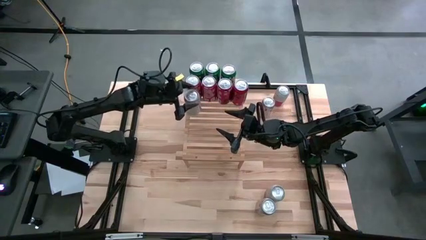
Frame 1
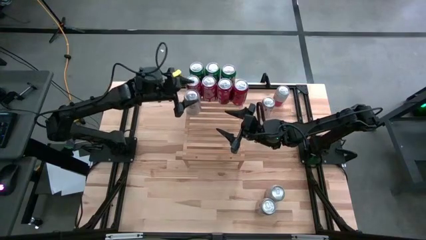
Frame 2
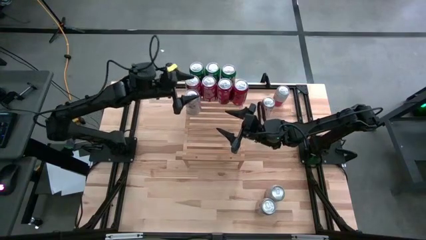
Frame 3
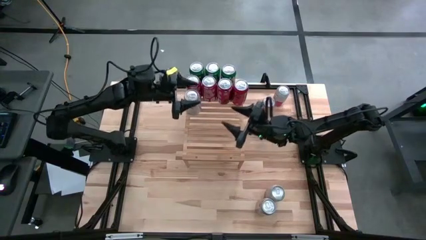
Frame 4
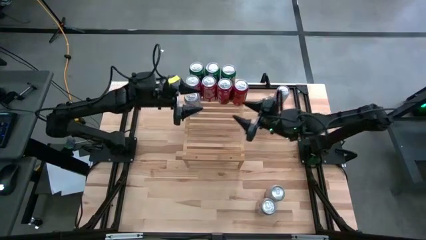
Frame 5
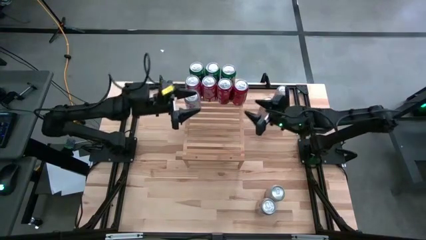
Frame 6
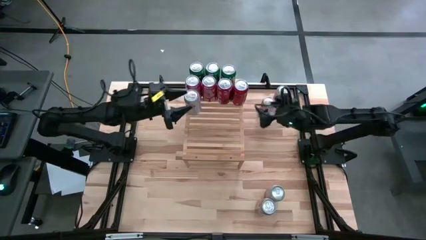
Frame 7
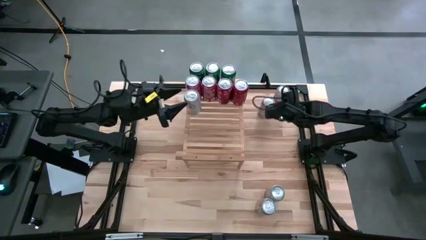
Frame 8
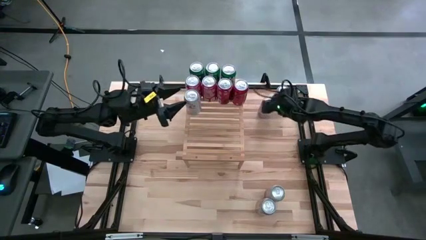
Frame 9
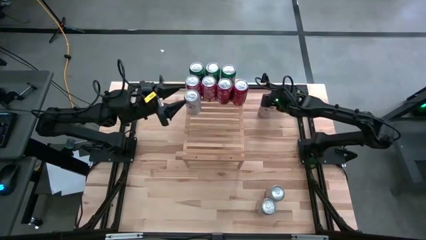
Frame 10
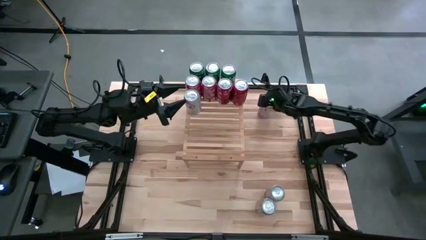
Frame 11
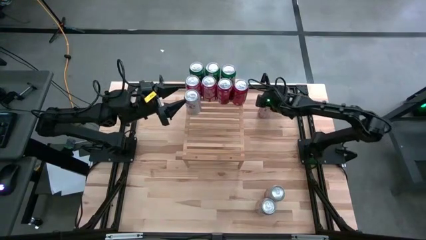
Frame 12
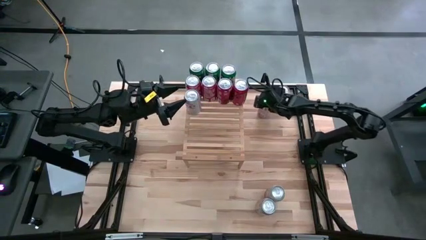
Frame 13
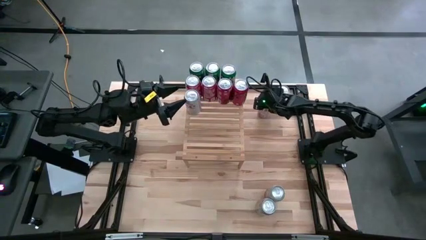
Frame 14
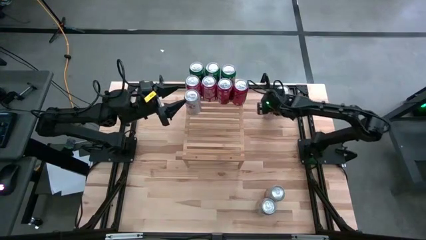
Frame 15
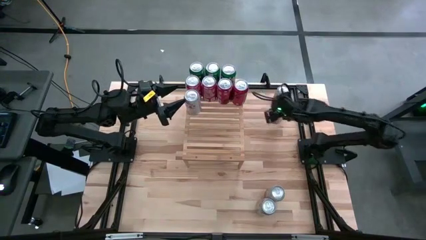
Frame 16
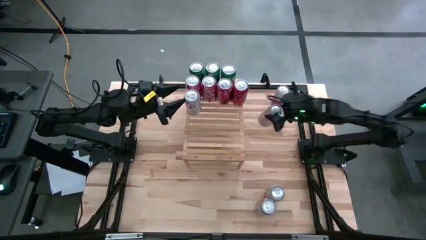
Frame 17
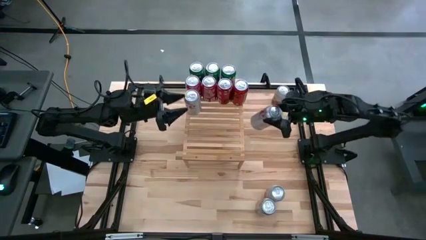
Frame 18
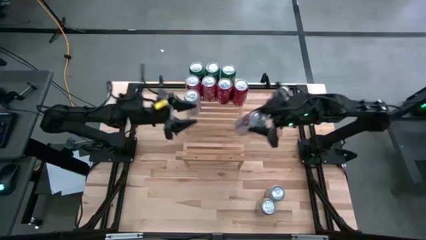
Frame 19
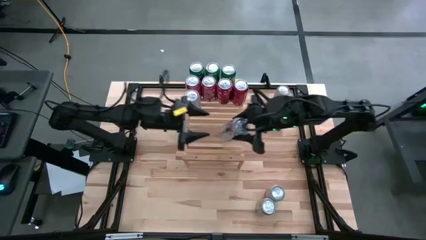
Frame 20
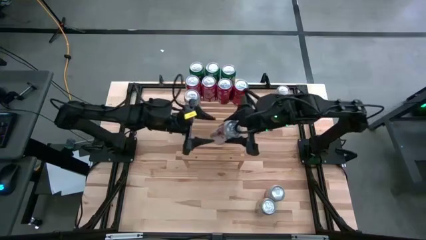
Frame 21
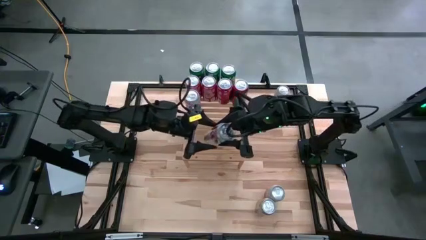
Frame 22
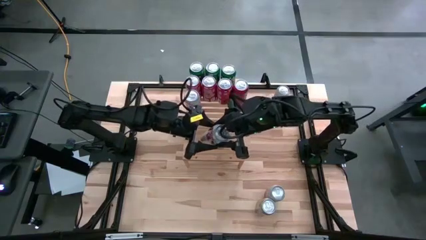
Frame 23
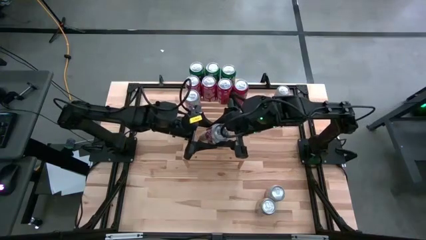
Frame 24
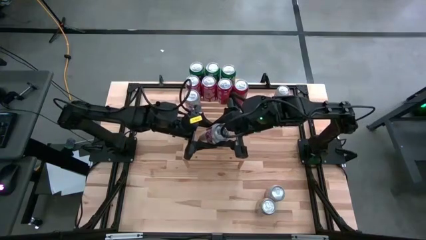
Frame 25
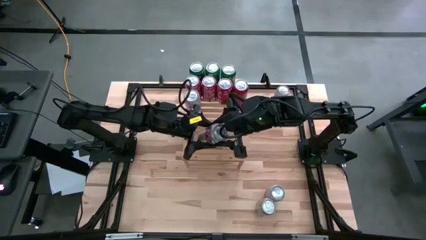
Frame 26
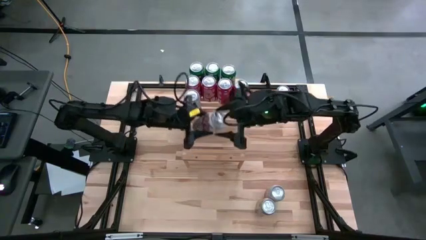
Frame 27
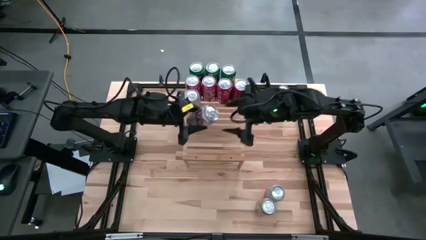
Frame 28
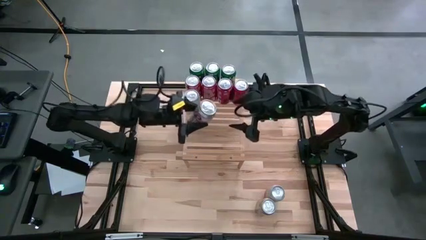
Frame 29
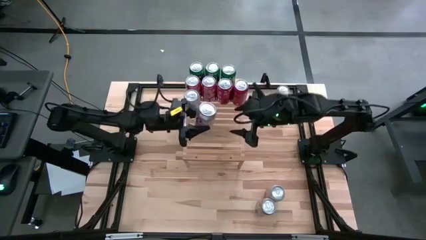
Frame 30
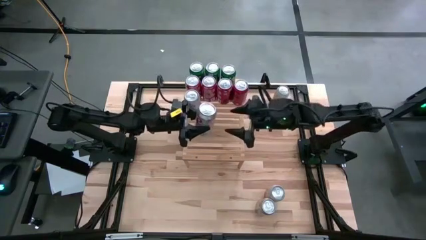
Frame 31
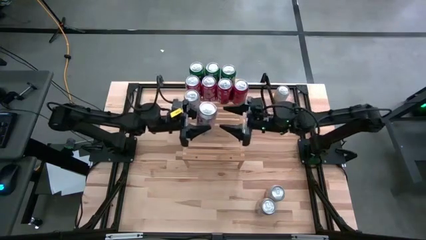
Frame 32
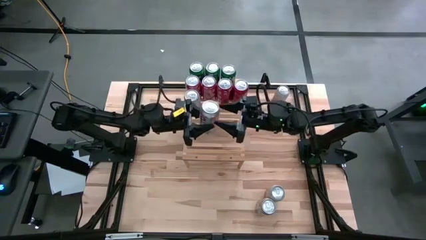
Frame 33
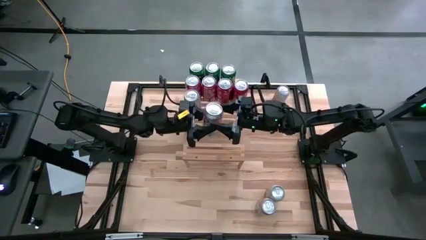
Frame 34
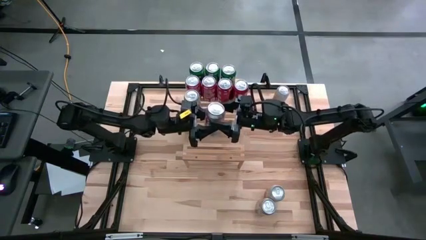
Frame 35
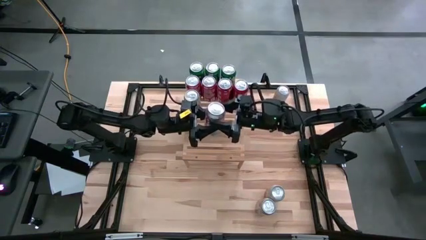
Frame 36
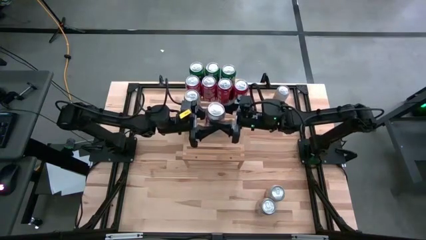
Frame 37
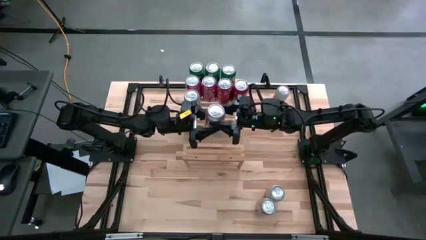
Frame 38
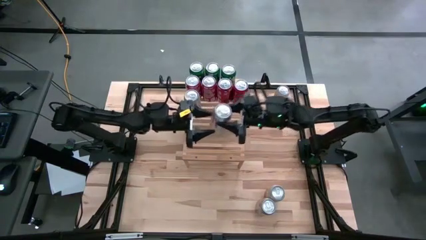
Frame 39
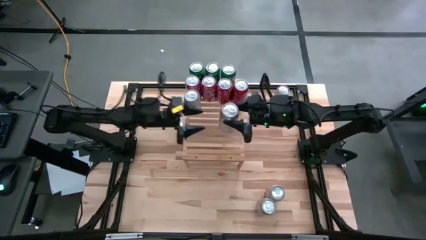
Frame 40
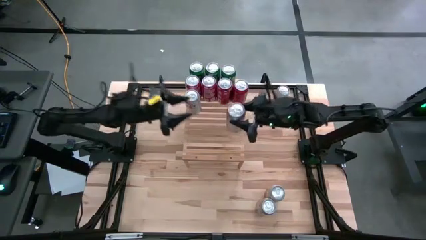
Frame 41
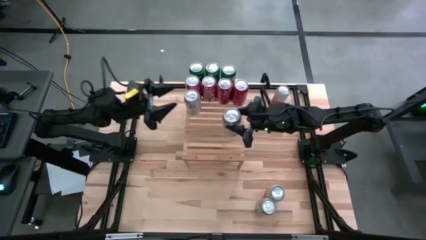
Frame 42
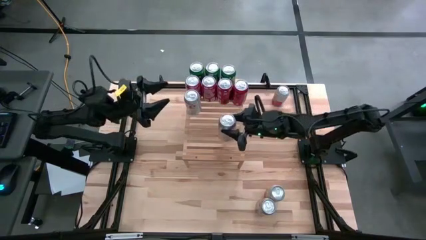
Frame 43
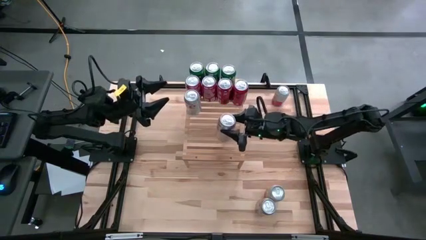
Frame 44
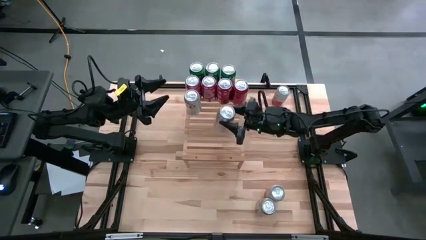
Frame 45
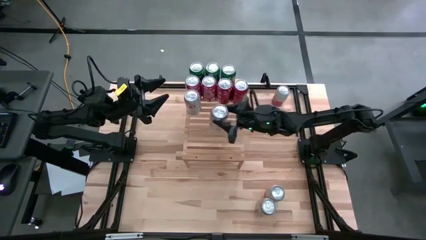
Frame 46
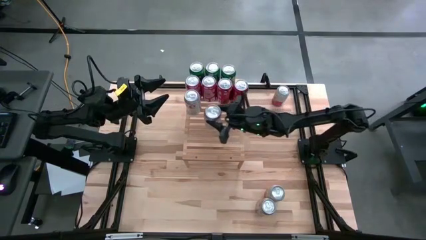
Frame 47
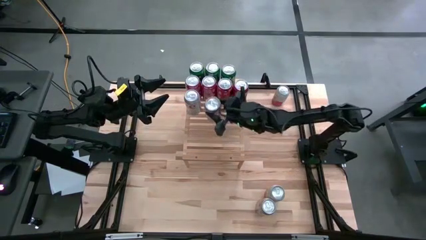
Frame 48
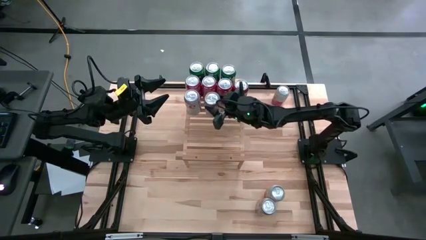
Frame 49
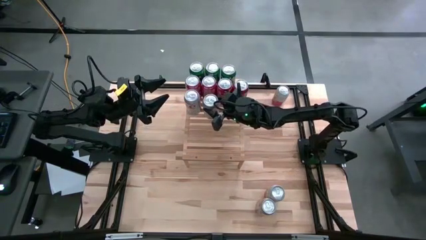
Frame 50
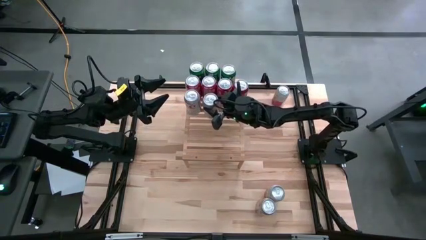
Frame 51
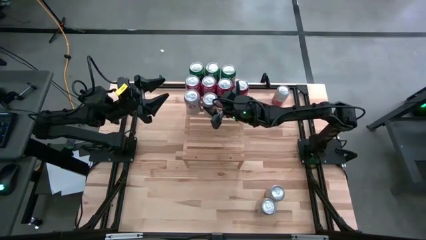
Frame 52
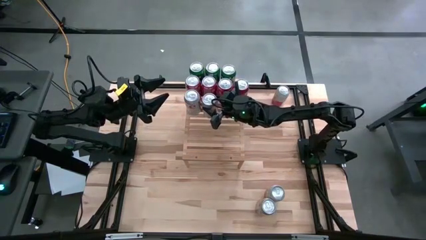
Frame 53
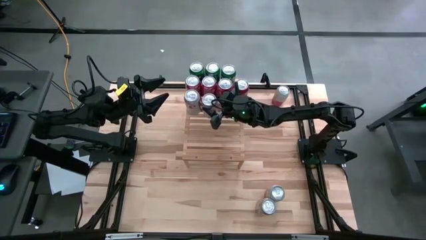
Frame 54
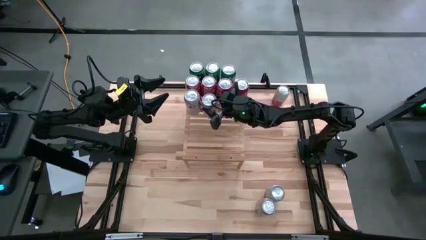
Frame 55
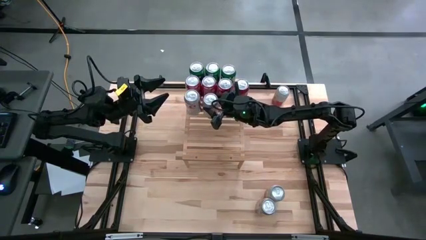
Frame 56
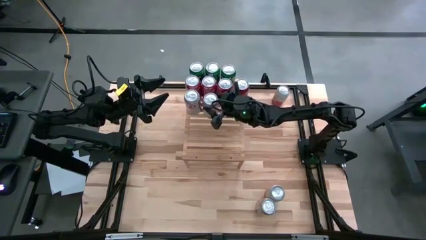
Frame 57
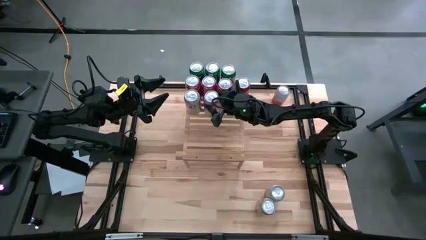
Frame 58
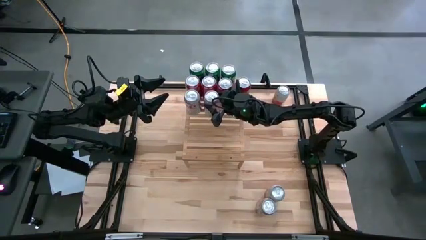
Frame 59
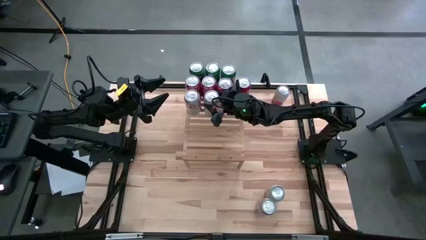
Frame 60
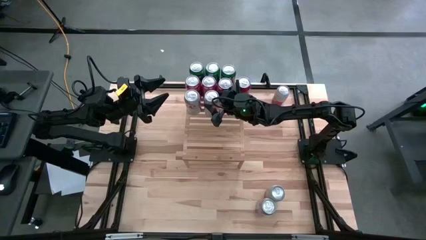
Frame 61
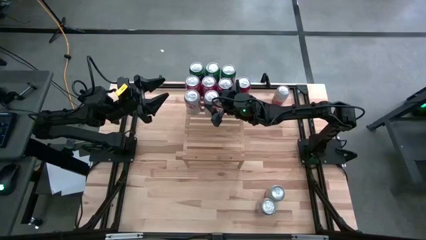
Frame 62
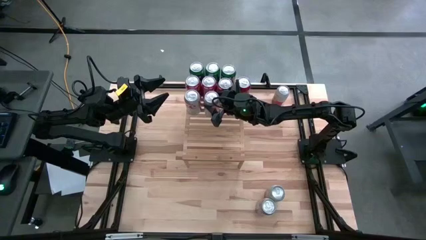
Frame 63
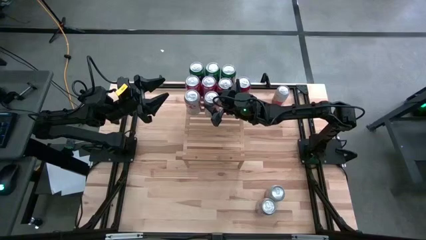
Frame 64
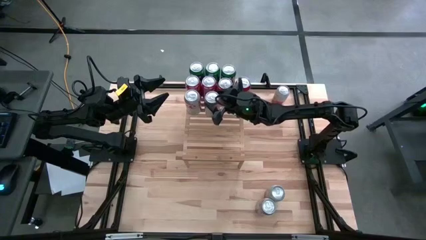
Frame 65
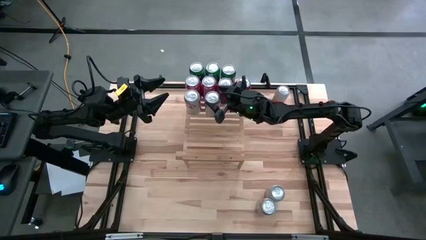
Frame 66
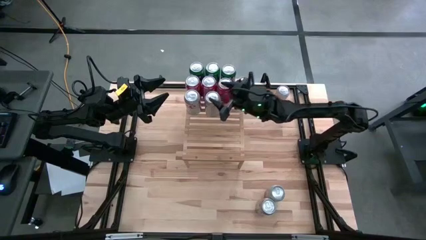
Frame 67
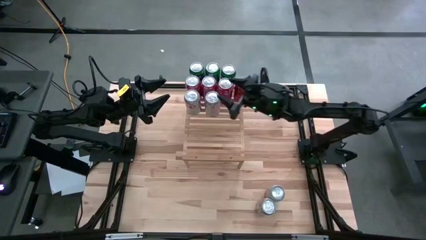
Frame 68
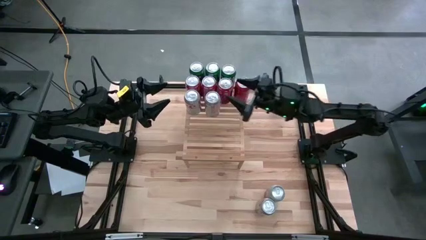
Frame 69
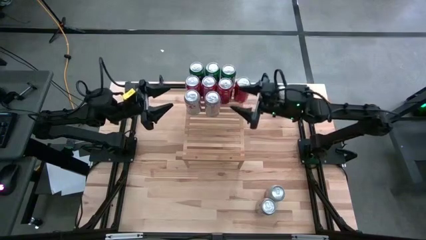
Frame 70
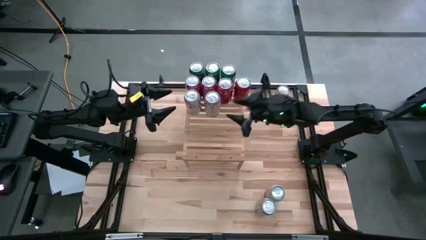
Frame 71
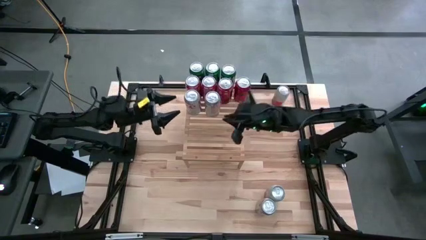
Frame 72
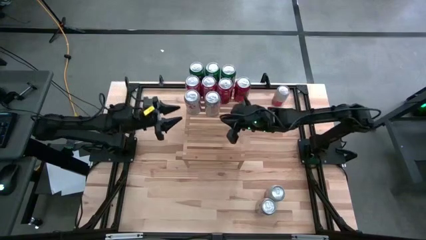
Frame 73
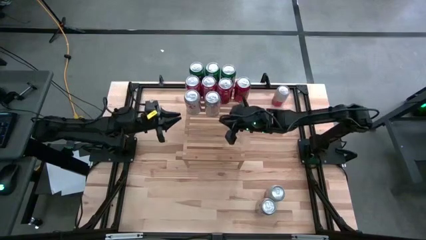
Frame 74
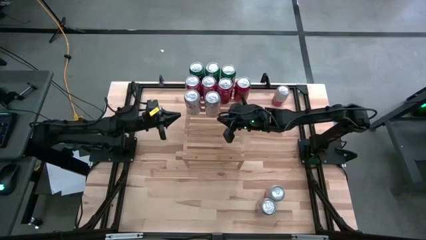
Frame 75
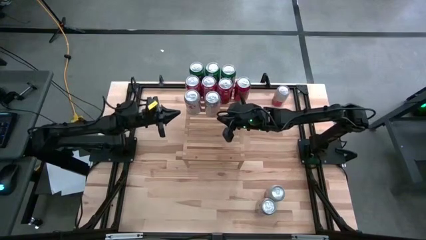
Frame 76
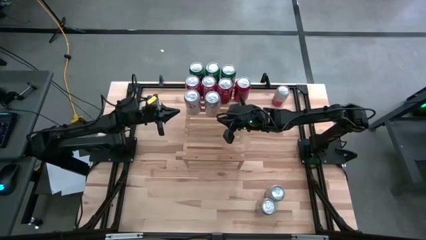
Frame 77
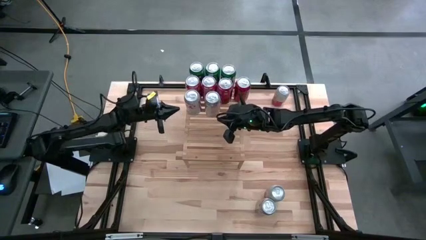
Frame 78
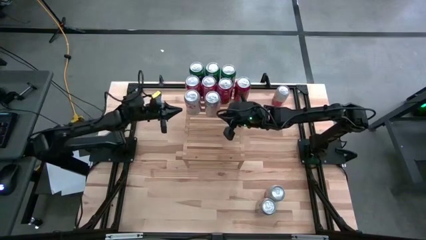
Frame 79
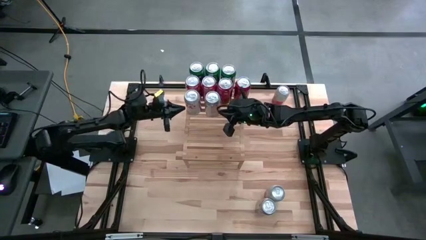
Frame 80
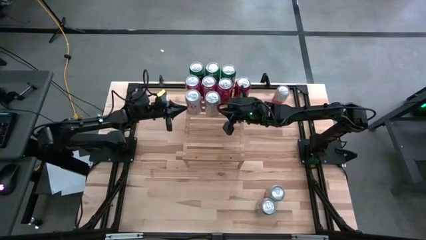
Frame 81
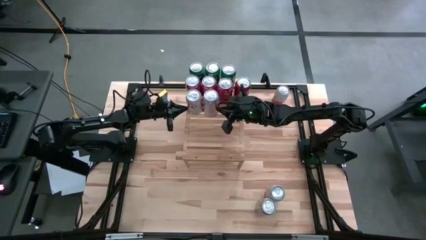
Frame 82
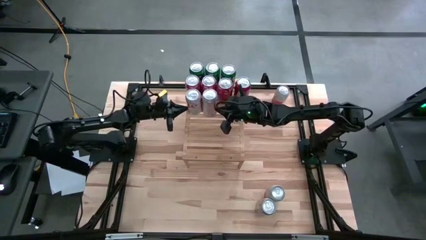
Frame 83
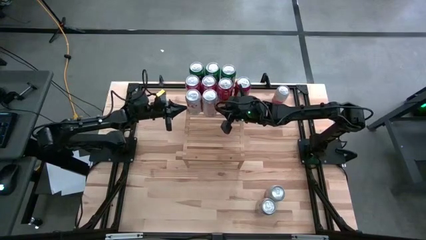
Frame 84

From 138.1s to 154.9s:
Task: Place canned beverage on shelf
Put the top silver soda can on the shelf aligned with the other silver soda can

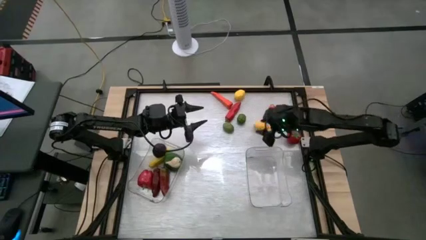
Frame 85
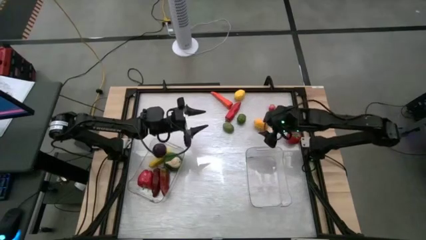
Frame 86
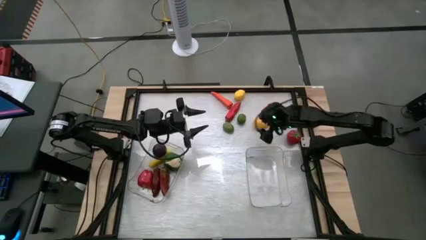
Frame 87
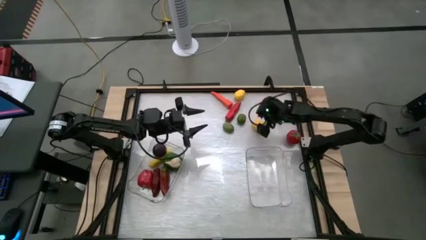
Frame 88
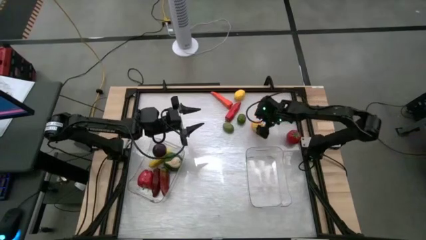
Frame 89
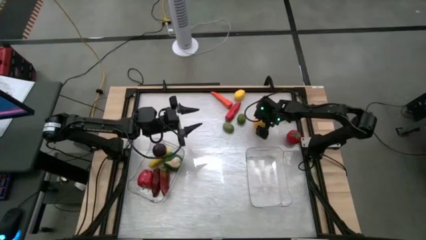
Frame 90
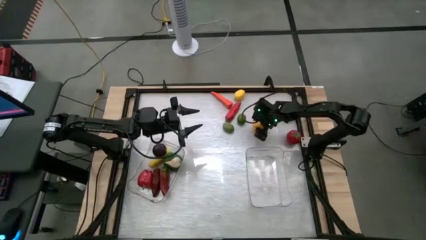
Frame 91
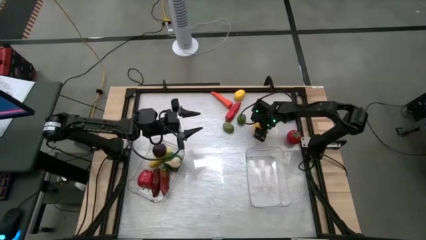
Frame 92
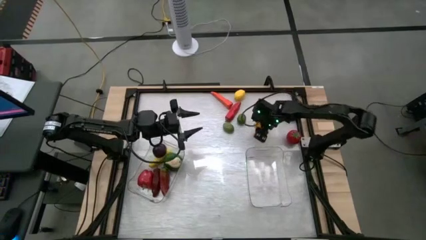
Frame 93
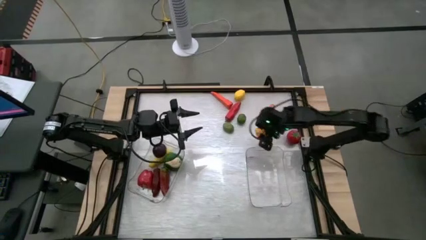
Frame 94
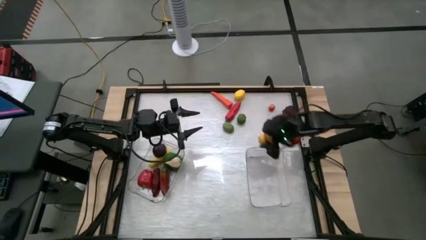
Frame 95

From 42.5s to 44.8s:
Task: Sort produce into baskets
Put the bottom yellow lemon into the right transparent bin
